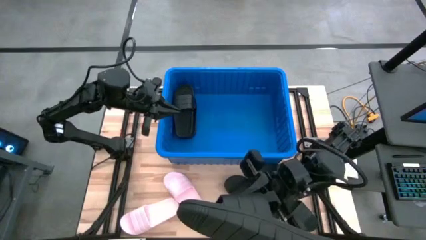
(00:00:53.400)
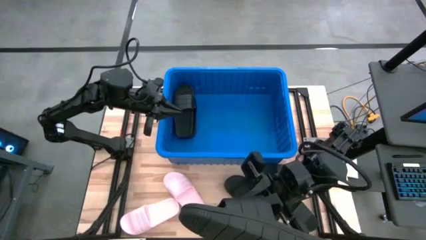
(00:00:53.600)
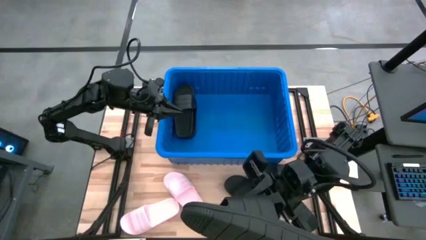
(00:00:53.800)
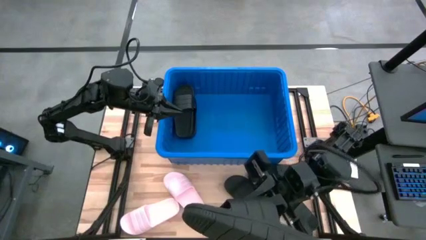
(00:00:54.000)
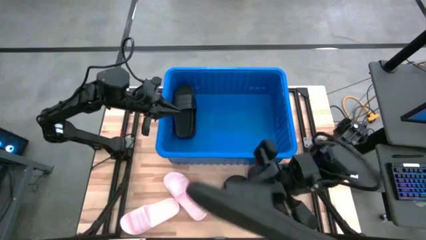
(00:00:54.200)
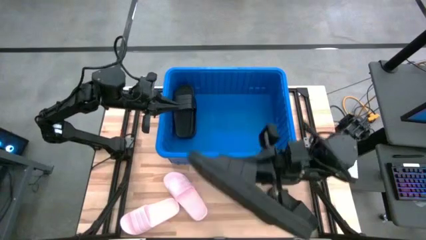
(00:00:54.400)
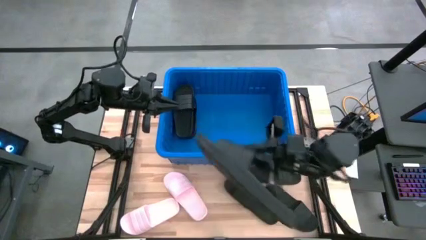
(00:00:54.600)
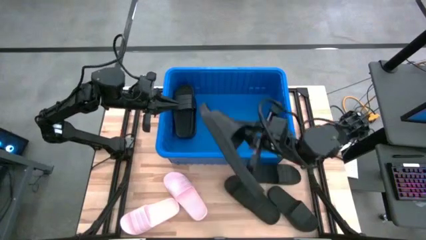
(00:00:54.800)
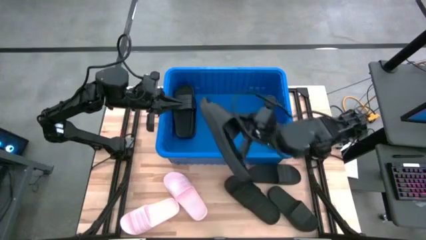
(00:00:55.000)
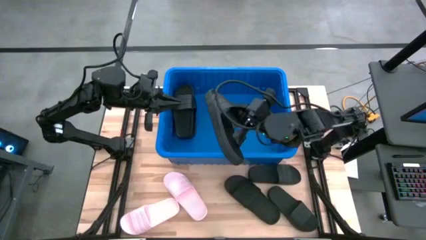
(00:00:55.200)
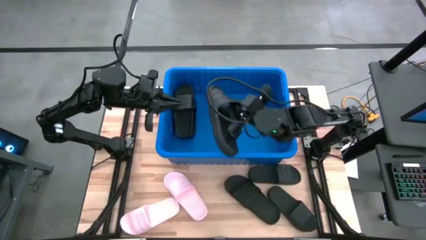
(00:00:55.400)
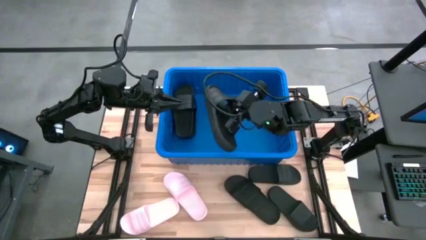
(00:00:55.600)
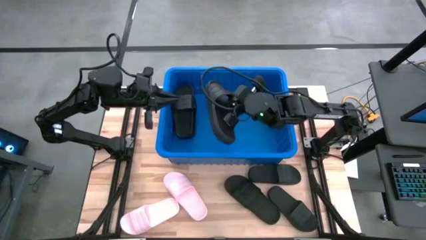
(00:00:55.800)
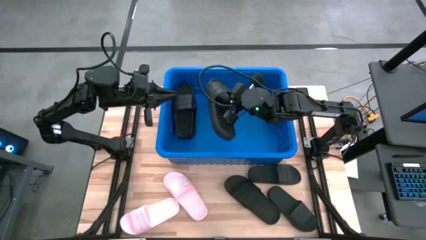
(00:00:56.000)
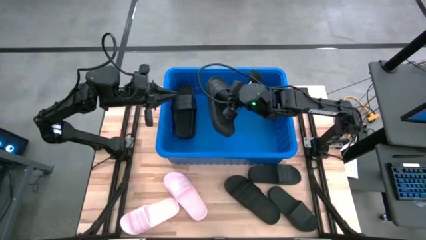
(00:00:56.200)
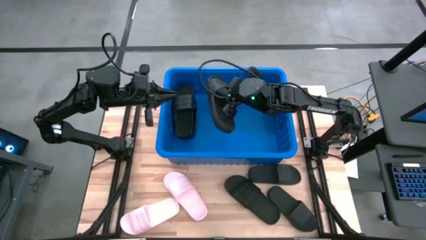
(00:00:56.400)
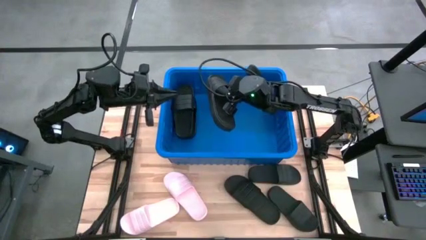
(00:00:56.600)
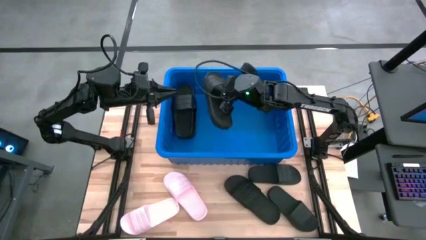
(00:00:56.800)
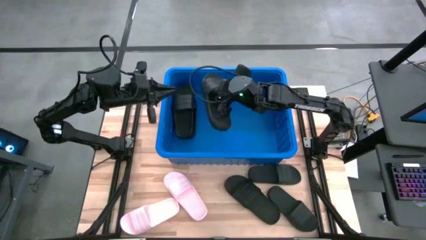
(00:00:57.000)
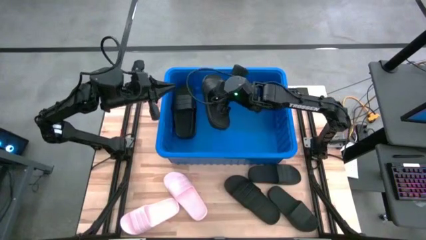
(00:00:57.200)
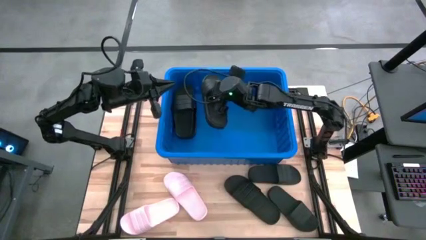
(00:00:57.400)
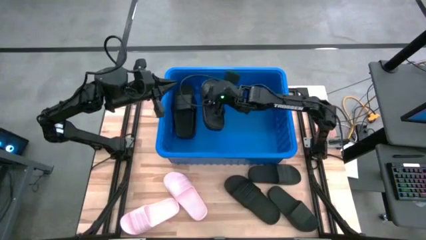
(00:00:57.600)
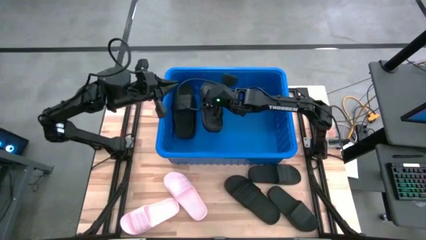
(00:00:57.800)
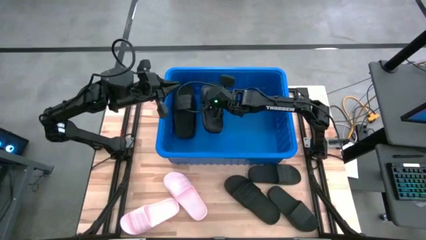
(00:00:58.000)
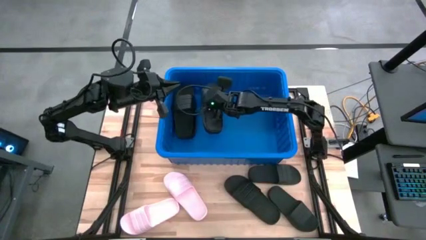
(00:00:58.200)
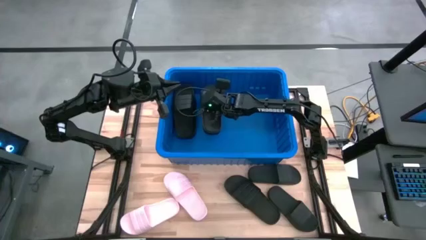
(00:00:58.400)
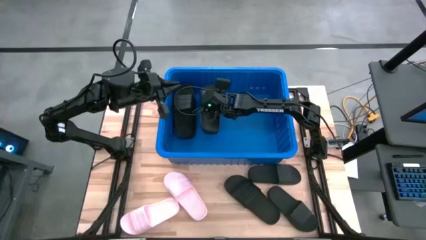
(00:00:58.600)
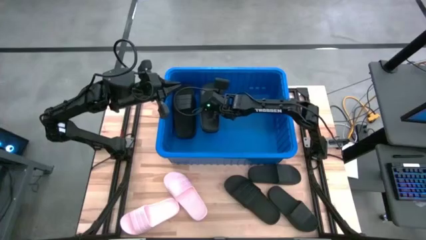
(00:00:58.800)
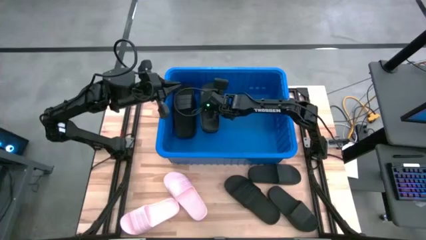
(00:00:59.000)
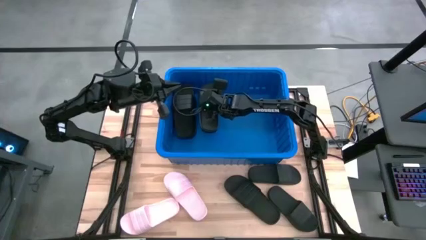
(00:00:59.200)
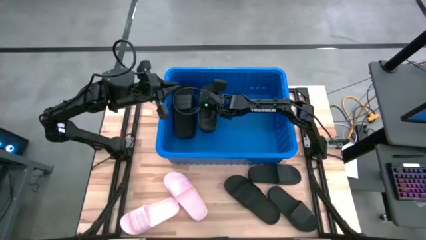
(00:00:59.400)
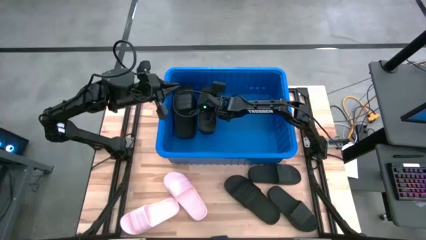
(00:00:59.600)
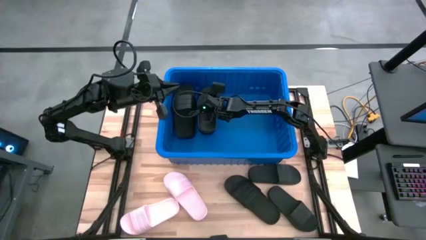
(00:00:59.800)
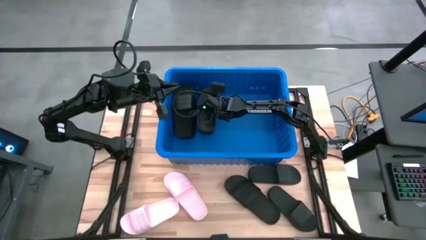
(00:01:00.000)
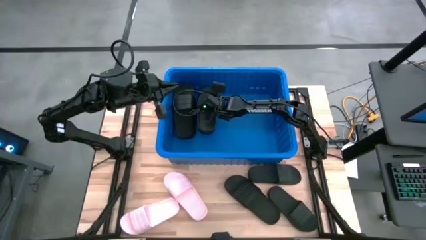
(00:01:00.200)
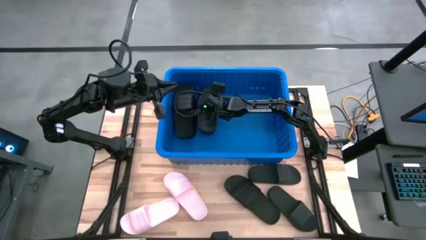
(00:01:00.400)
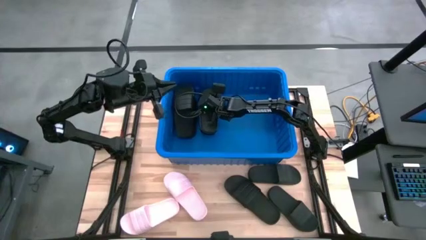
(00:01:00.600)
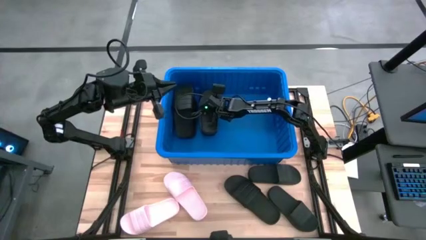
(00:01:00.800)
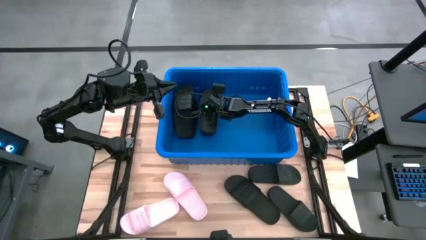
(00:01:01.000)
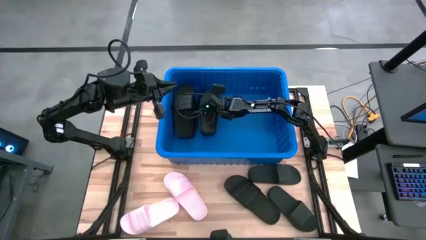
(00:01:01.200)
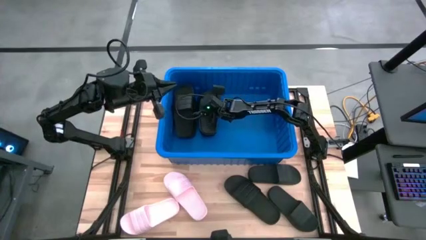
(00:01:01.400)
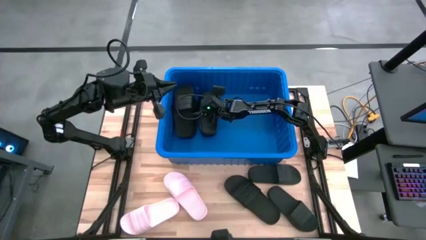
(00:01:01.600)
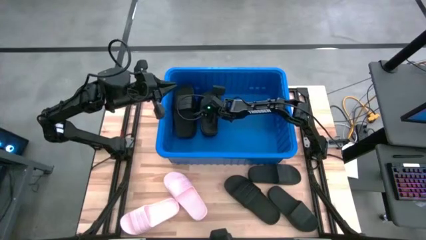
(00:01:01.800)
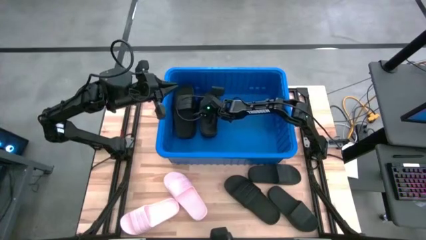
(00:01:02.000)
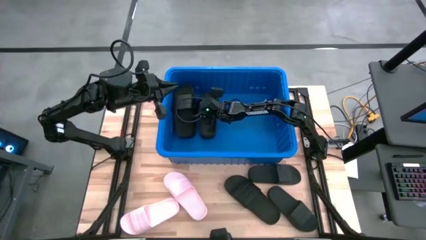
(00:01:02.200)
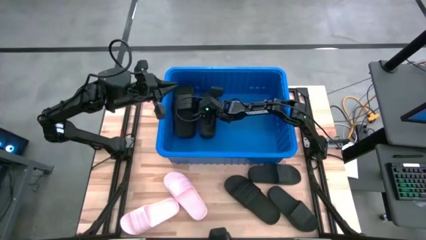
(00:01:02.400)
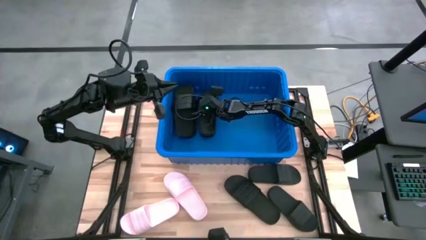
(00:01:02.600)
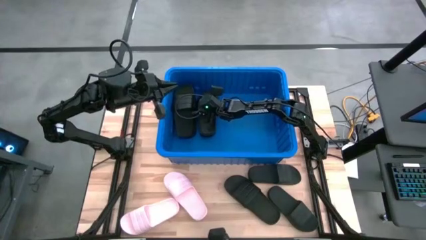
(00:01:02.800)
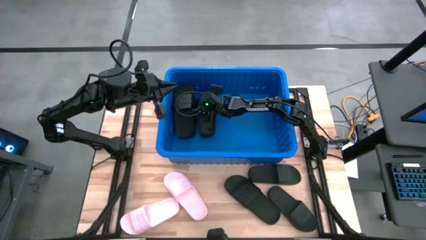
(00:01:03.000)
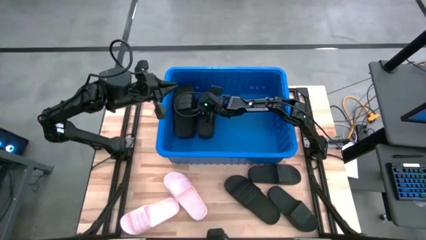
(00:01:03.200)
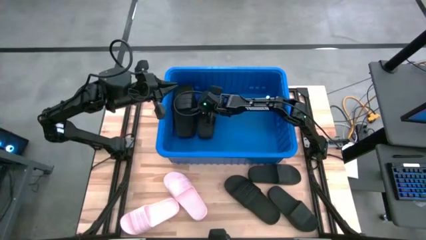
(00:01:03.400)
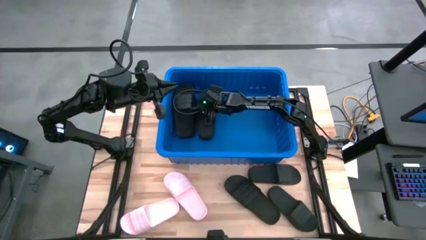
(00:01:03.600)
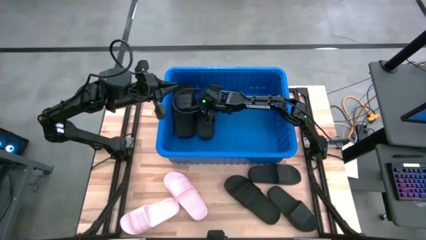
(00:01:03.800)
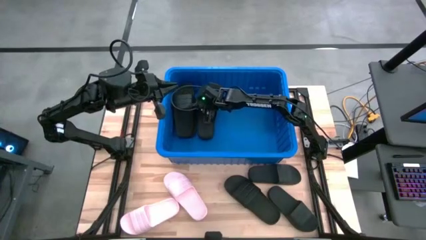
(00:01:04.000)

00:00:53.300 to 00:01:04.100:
Task: Pick and place slides into bin
Put the black slide into the blue bin
